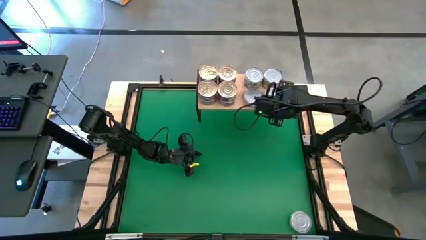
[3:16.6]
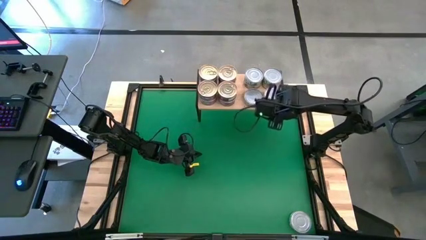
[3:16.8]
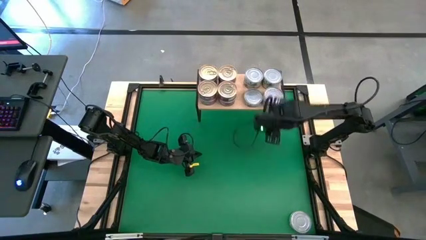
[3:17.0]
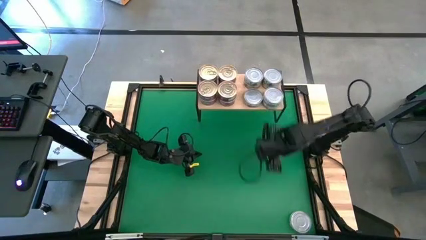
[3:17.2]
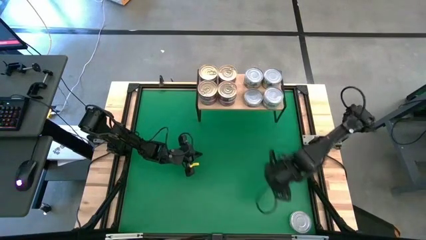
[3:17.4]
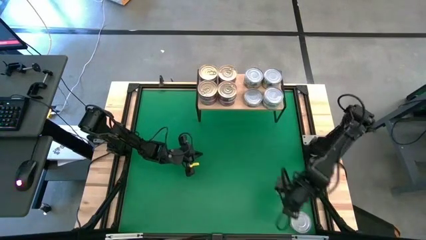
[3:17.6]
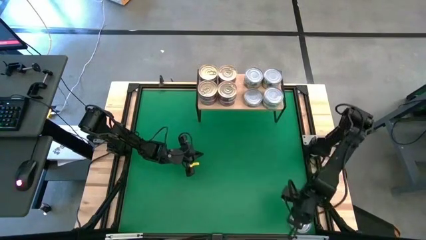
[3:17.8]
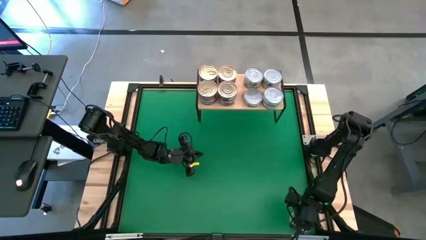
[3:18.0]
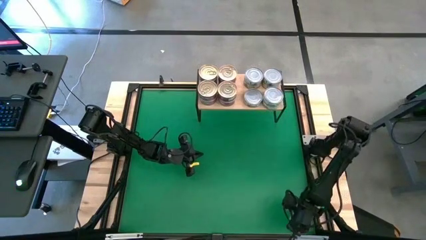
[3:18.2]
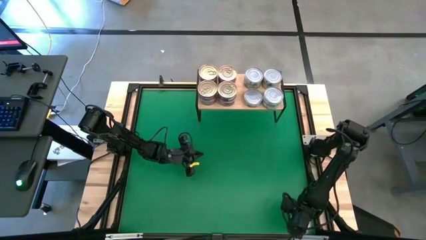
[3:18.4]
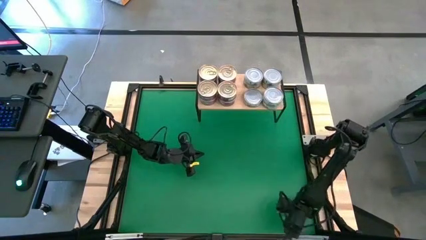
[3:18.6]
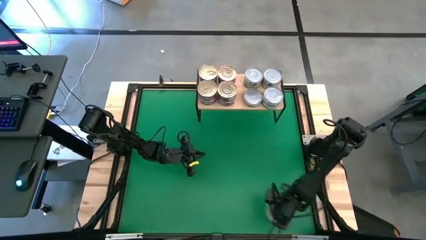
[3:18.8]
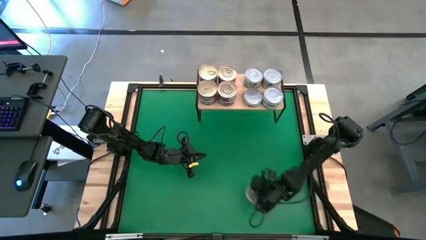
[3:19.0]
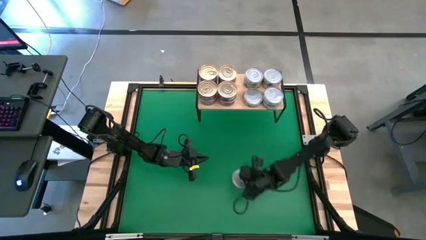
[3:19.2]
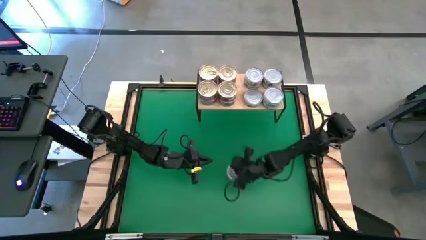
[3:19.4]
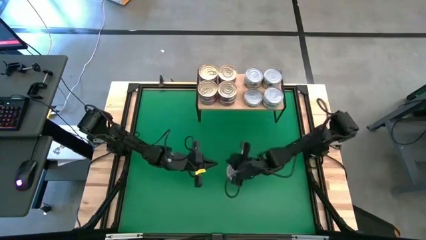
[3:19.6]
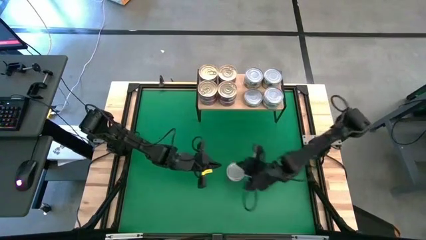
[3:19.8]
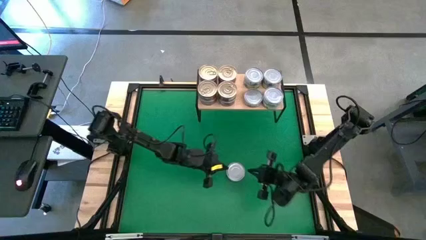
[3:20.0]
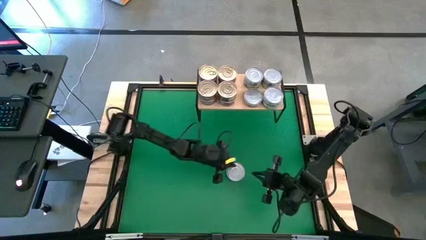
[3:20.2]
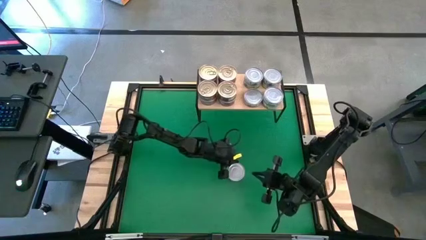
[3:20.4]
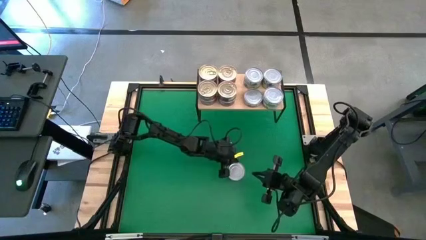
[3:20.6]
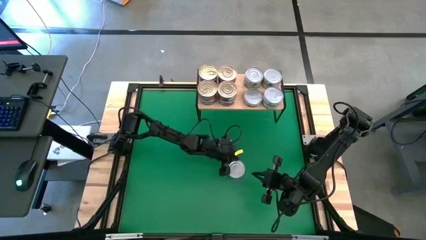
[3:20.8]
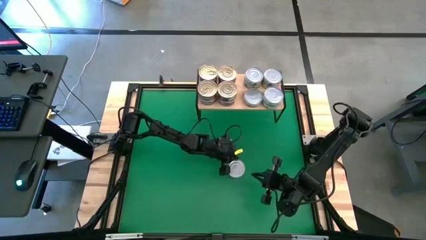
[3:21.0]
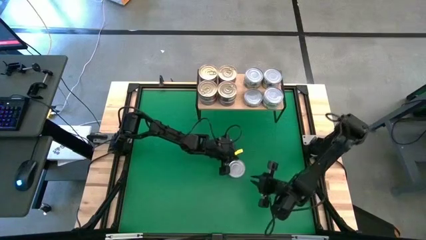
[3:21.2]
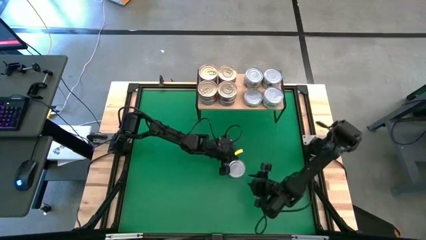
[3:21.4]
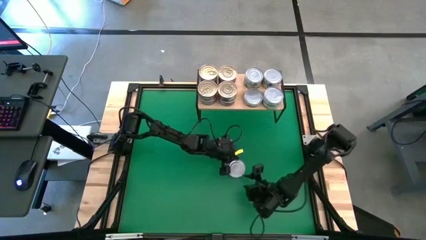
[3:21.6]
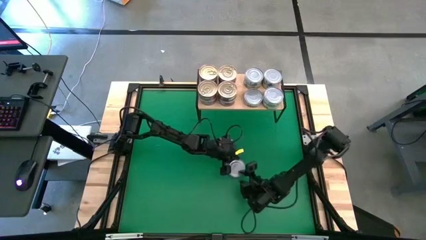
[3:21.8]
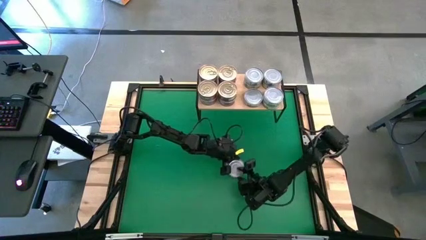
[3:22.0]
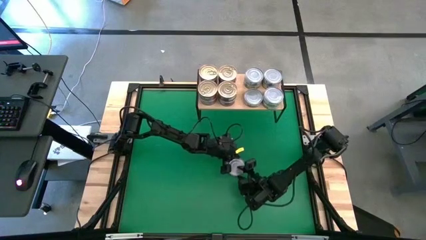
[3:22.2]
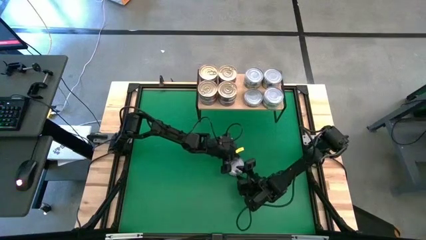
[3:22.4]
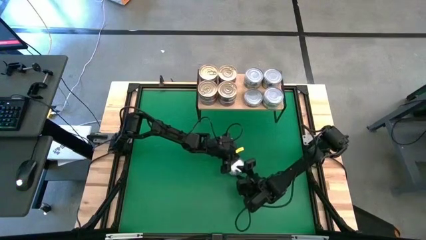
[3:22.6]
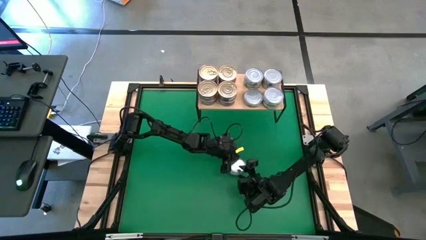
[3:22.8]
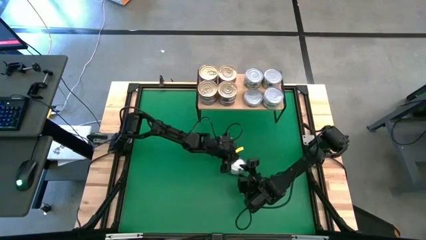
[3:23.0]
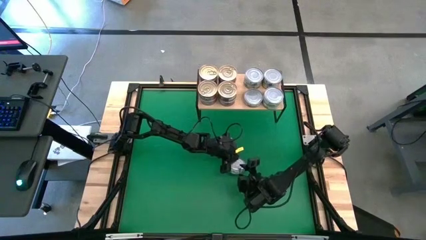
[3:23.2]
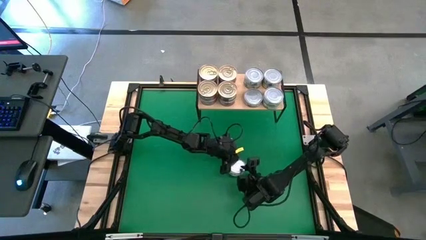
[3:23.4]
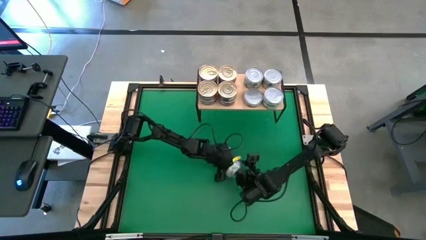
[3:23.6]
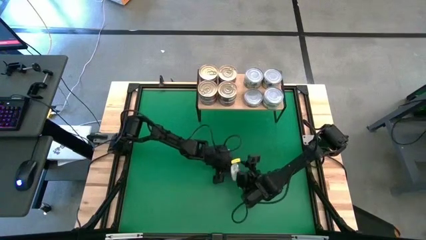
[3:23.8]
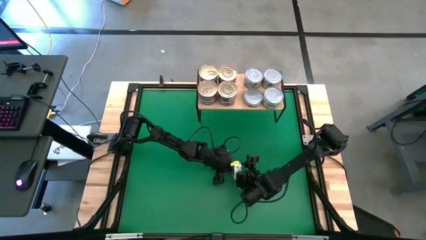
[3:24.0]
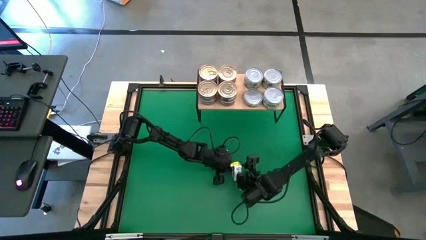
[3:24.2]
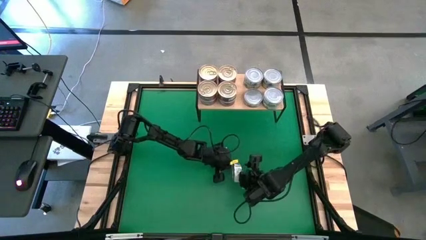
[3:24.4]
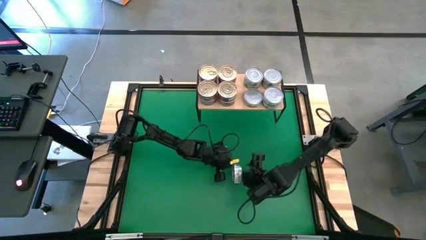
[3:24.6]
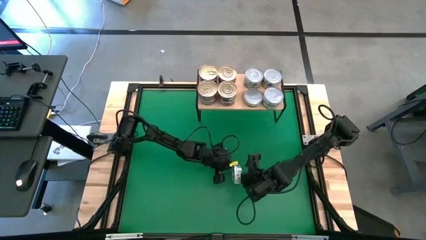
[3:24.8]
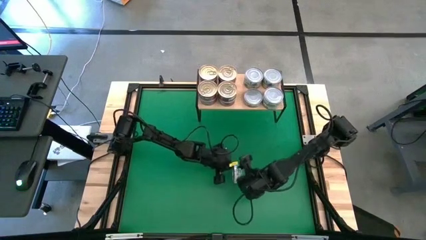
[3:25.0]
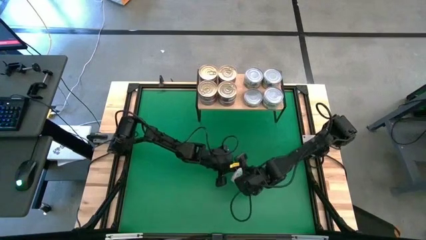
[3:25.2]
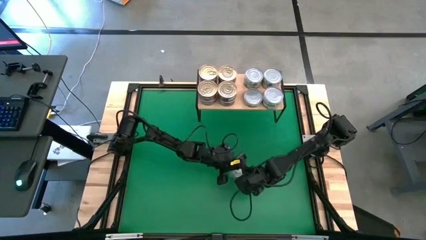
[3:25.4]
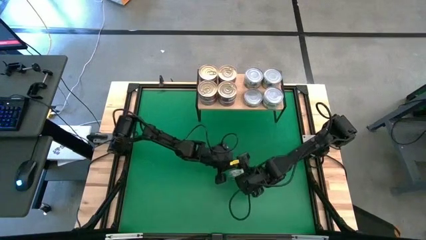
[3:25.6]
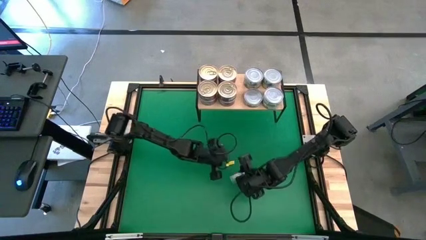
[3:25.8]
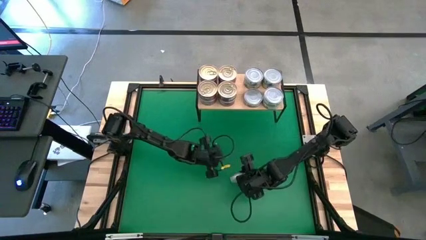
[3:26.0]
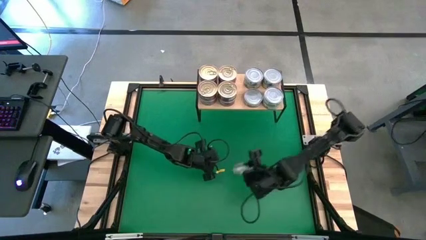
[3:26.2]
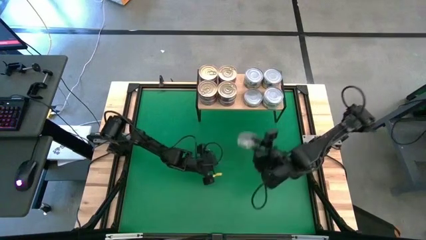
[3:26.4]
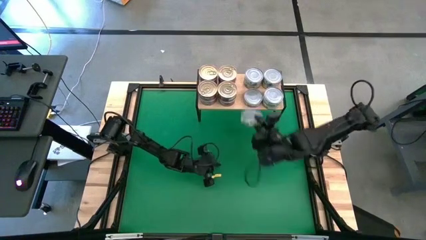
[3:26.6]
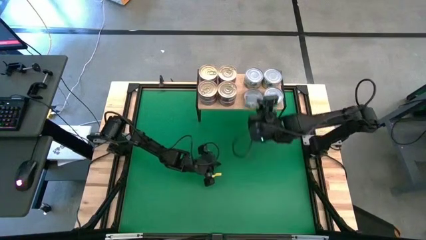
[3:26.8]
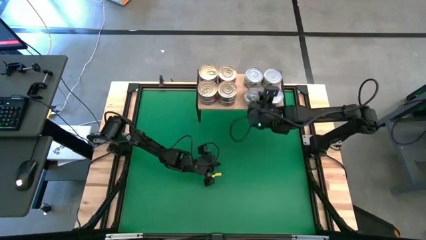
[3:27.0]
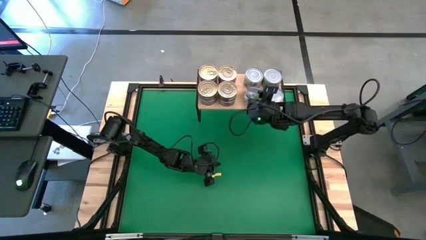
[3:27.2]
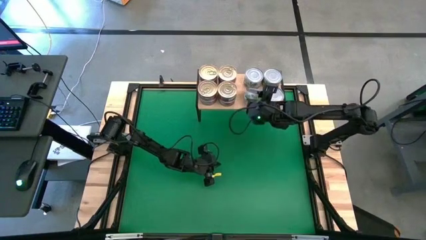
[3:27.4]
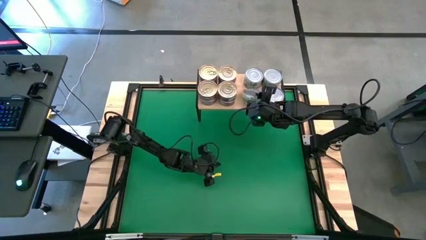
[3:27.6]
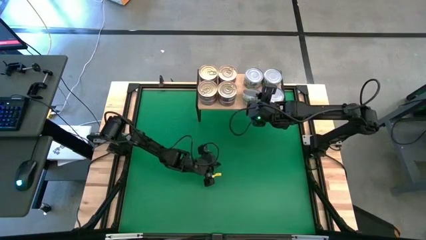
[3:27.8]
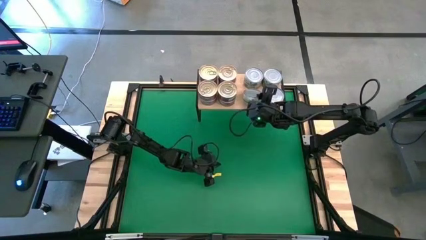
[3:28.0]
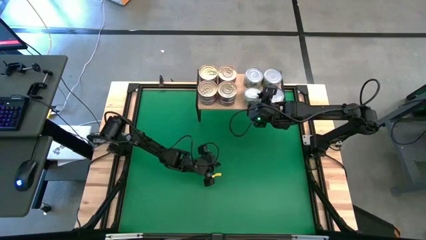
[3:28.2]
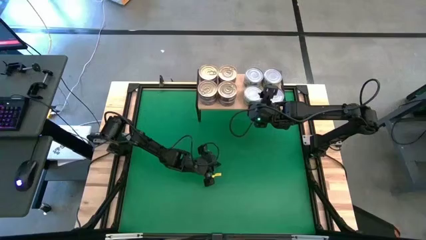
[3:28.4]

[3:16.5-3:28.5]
Task: Stack canned seafood by type on shelf
Stack the green tuna can on top of the green tuna can on the shelf

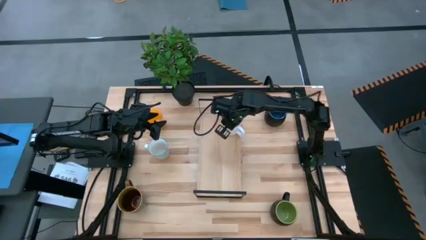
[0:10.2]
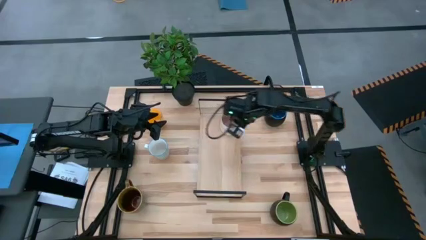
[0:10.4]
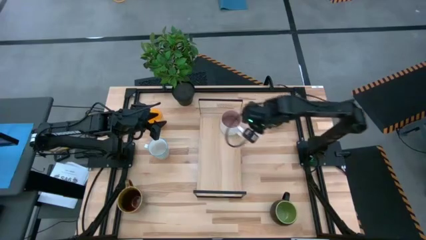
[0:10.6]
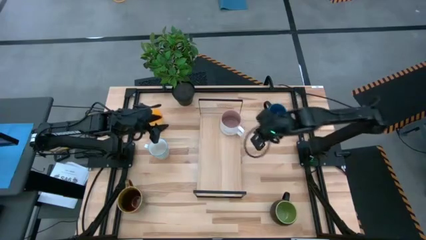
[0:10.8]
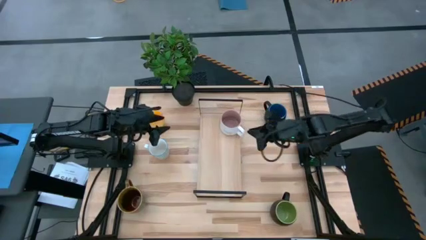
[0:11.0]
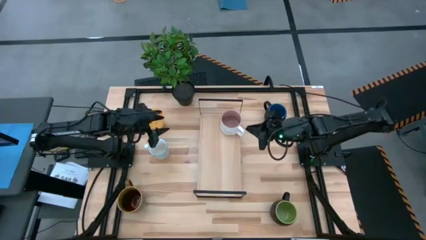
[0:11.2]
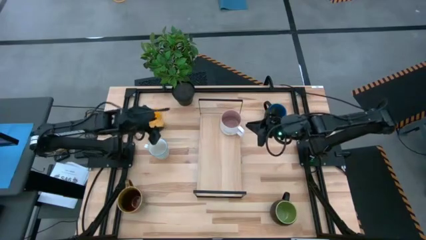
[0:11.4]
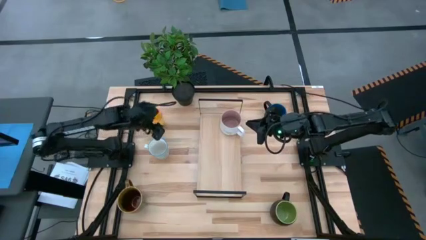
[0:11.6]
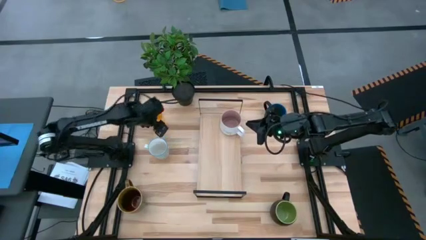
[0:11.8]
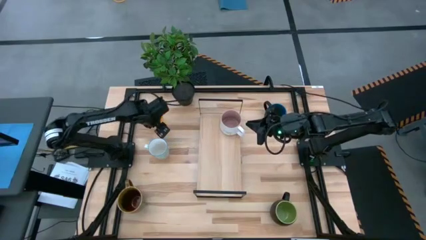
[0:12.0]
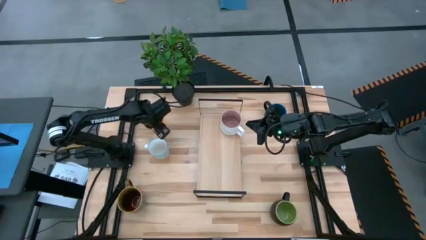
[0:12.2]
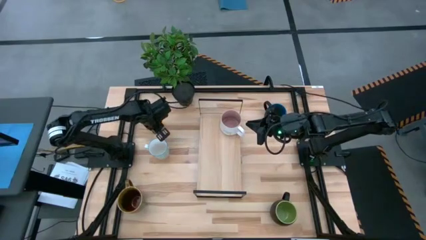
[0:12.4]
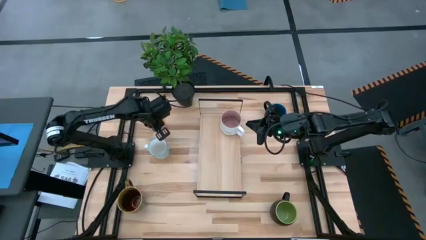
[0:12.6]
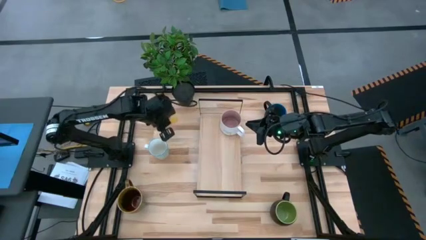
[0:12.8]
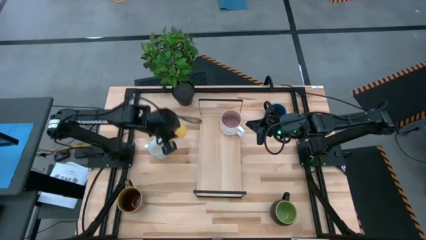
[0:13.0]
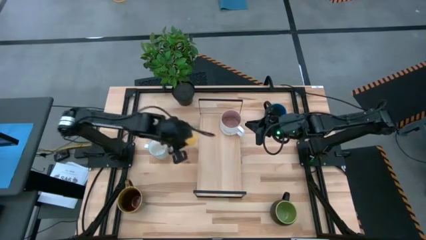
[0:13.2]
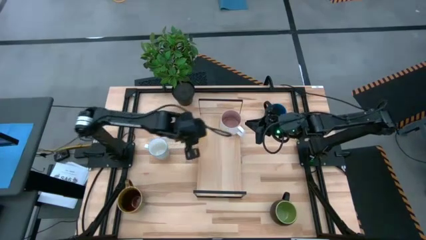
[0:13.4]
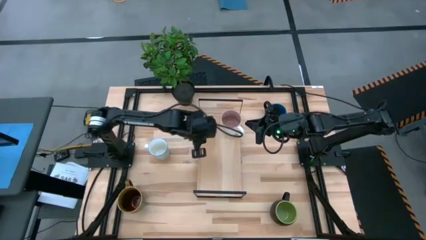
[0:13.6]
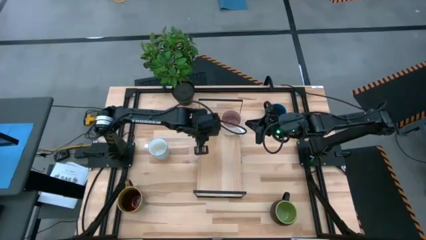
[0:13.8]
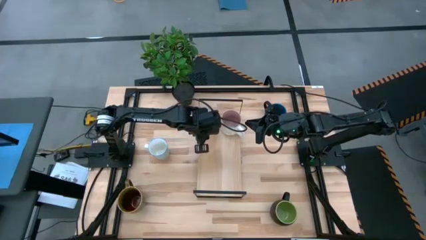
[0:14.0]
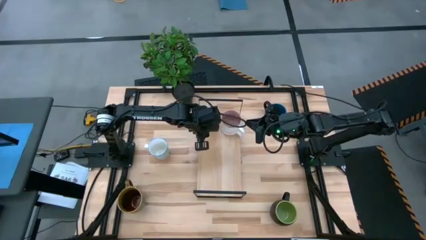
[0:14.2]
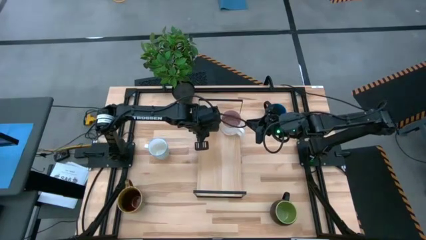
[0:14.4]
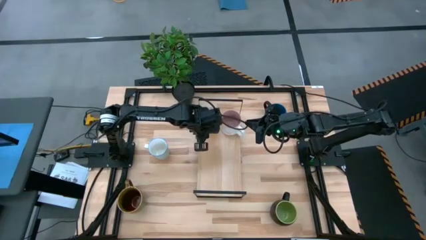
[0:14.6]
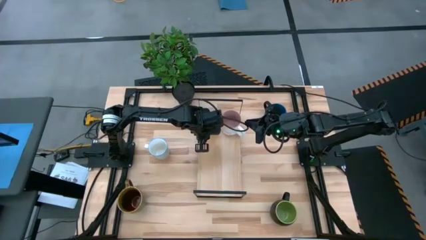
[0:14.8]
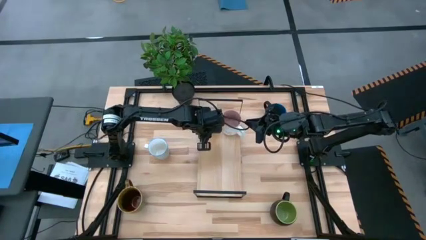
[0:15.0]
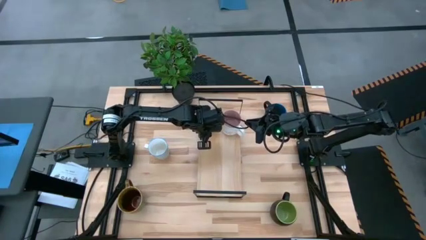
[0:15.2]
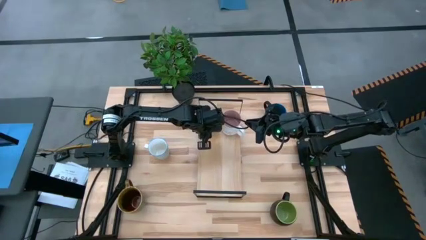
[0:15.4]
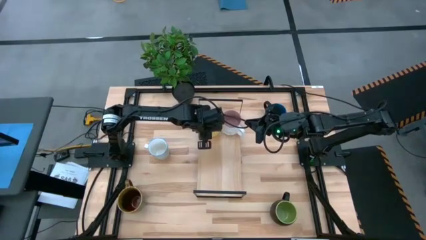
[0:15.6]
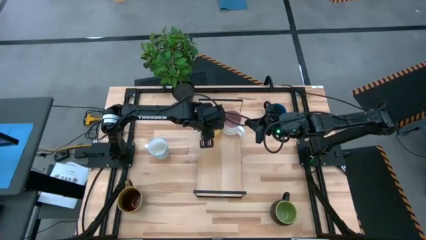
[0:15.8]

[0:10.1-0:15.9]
Task: Place coffee mugs
Put the yellow mug on the shelf
